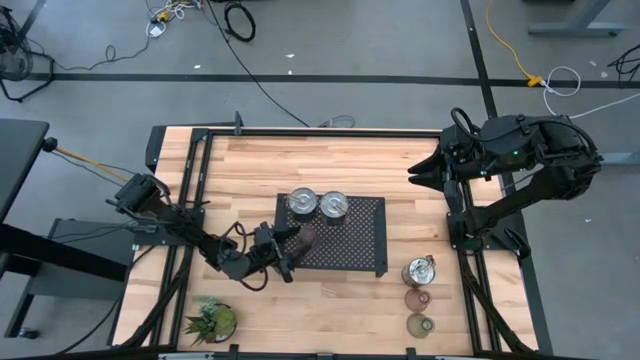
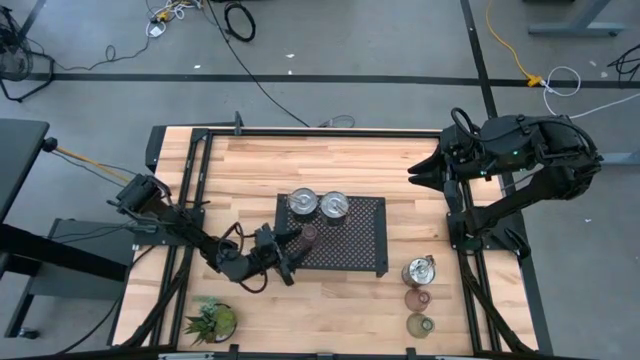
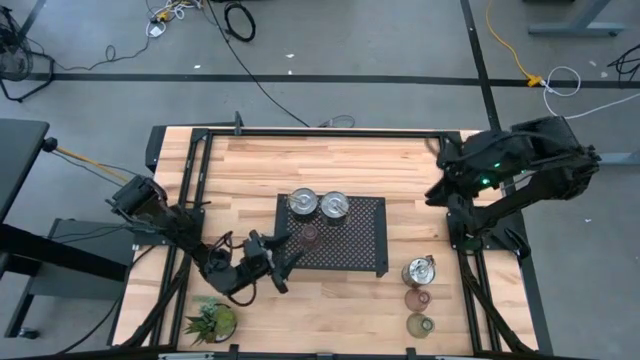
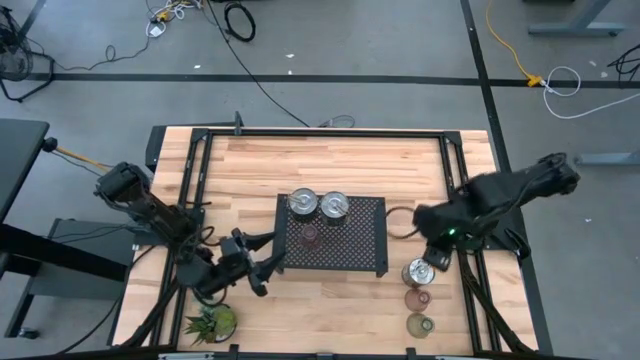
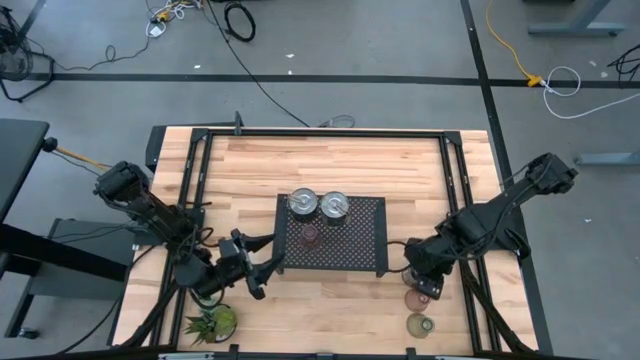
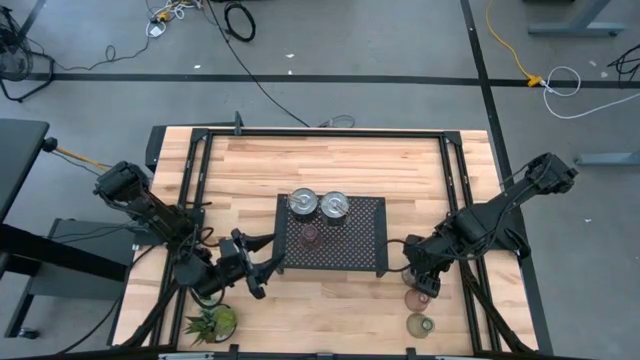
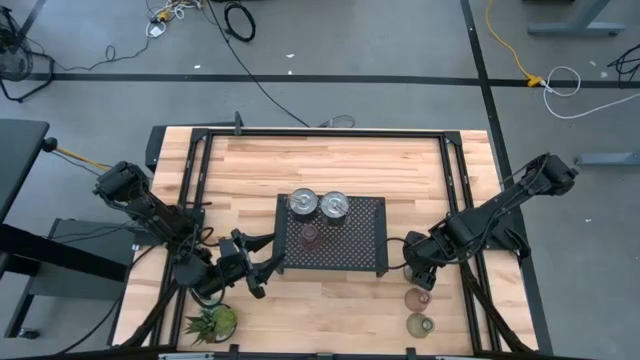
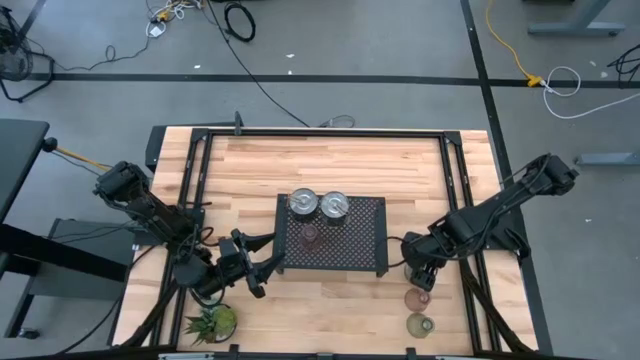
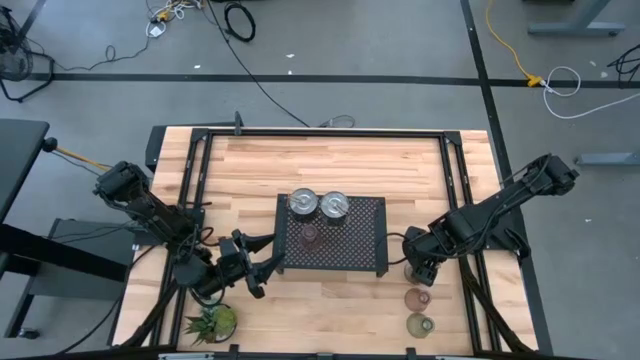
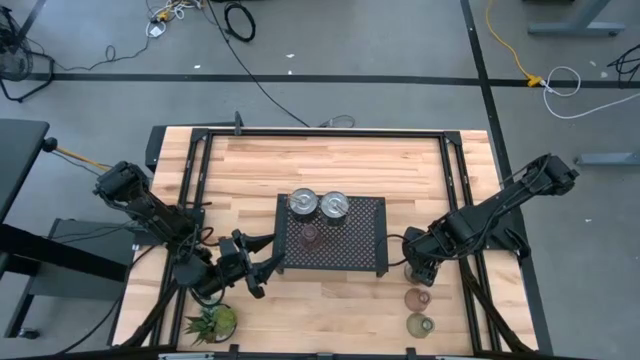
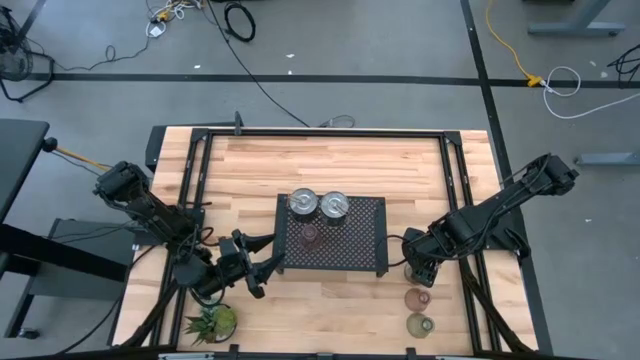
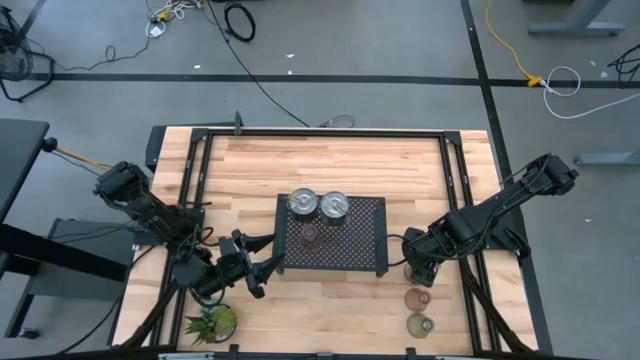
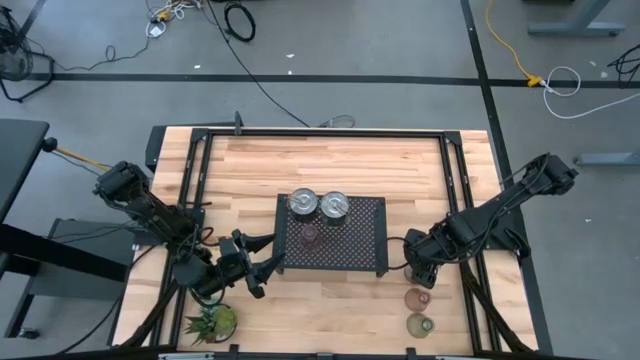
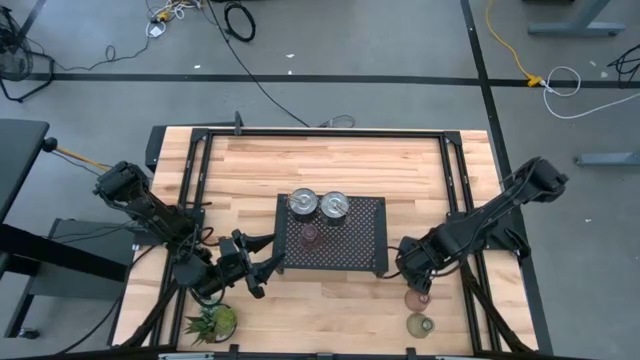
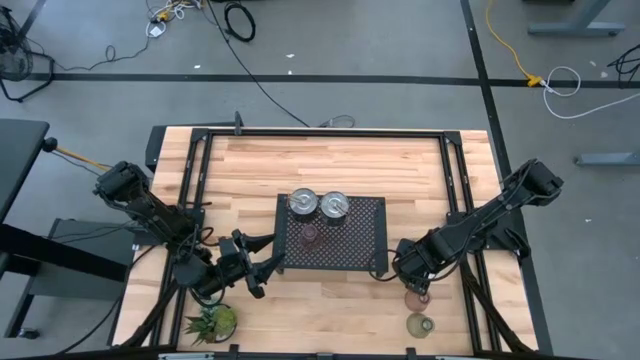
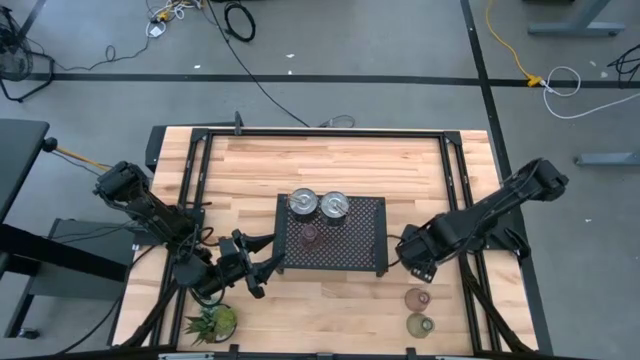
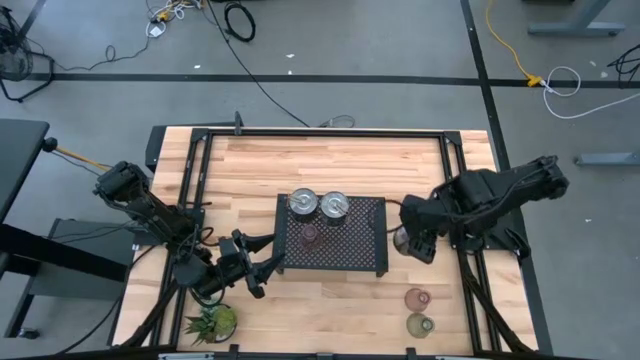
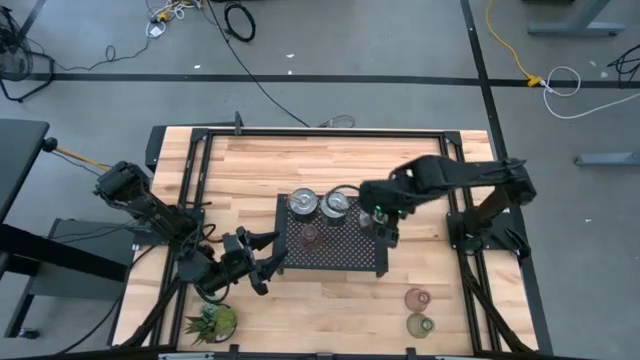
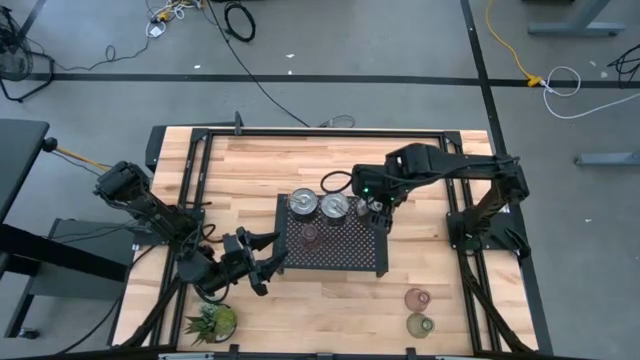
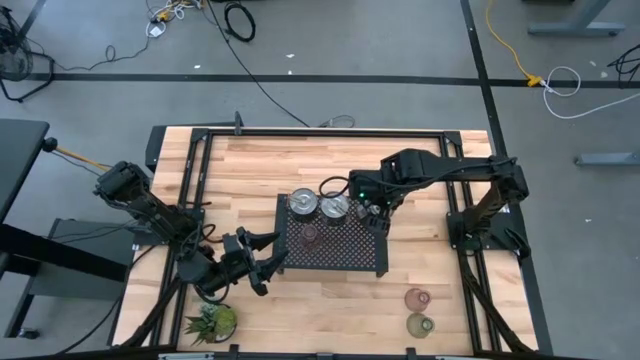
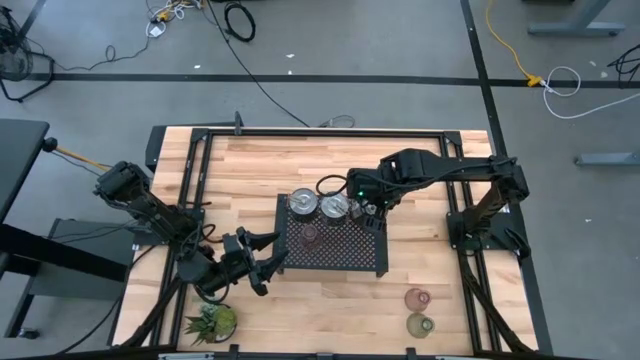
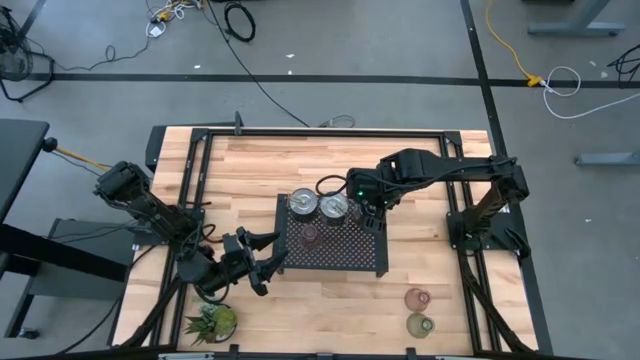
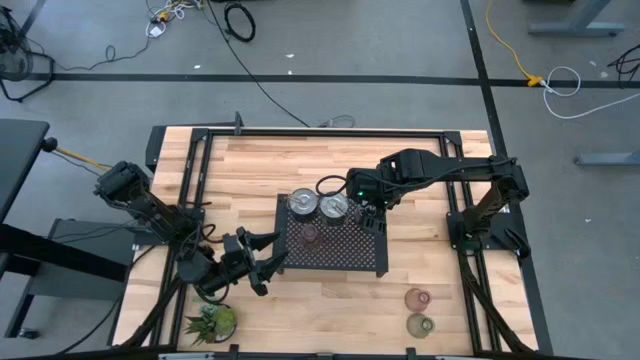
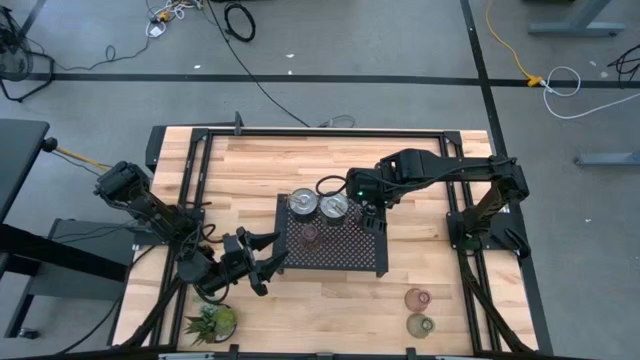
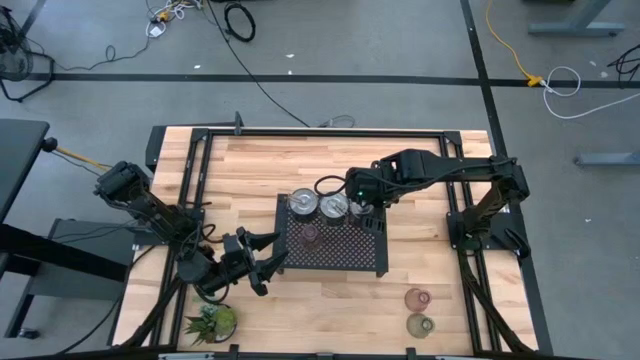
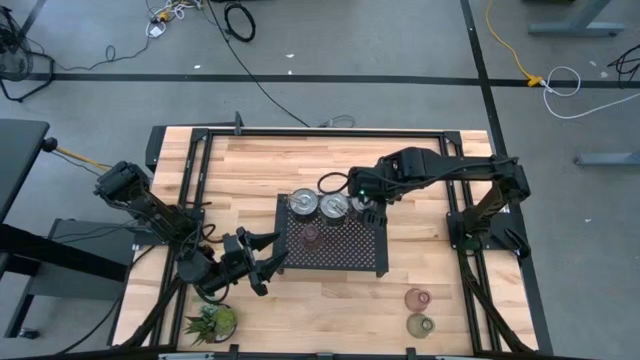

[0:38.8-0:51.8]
Task: Pick & Place candle stick holders
Put the brown scented candle on the shelf aligned with the other scented candles

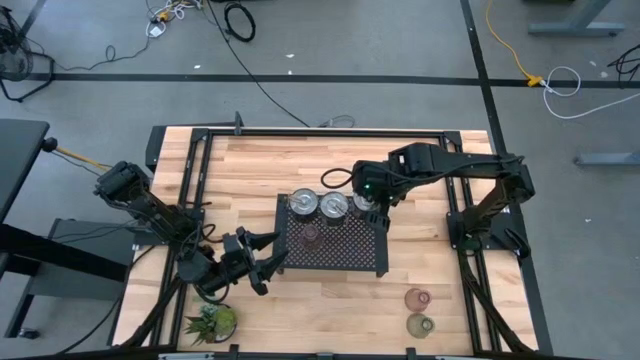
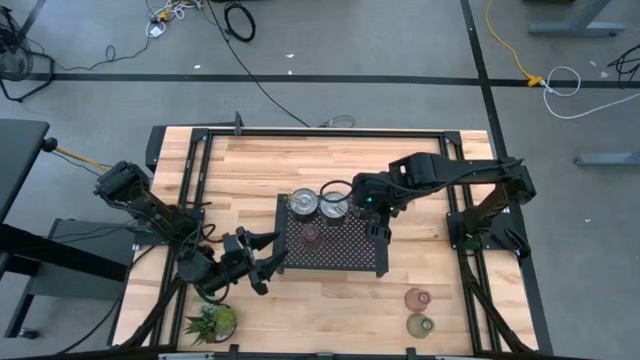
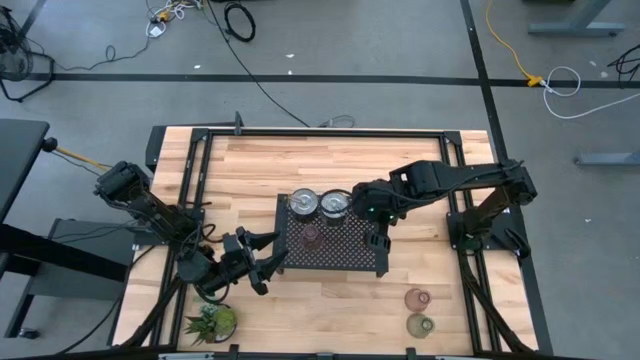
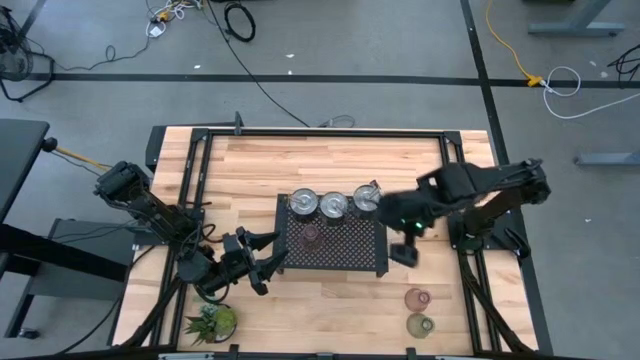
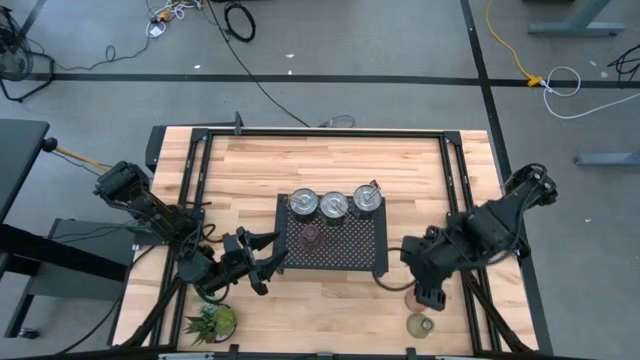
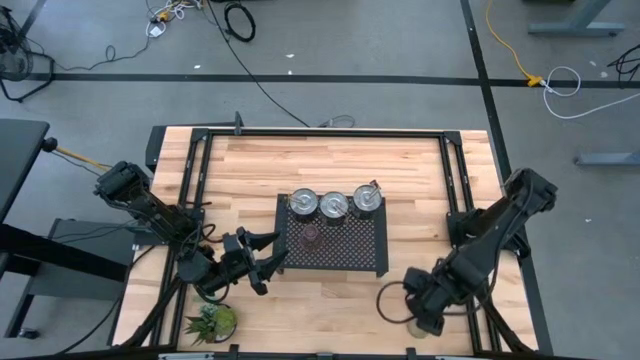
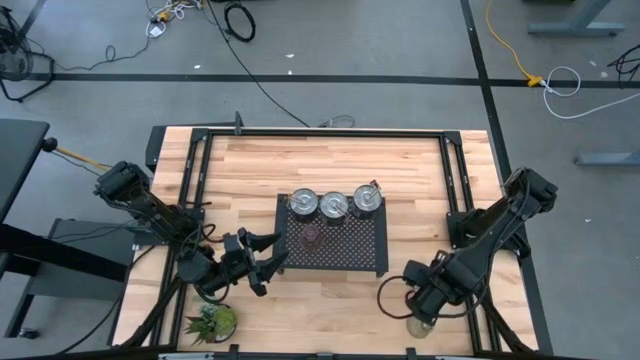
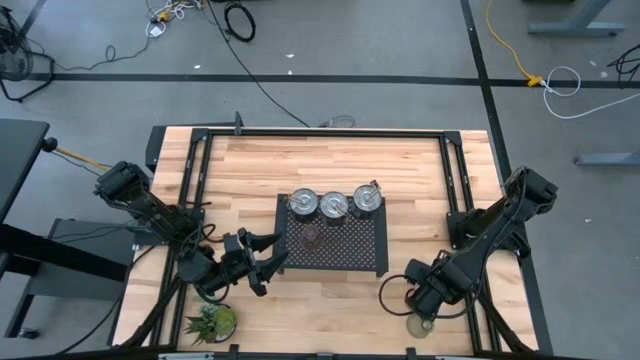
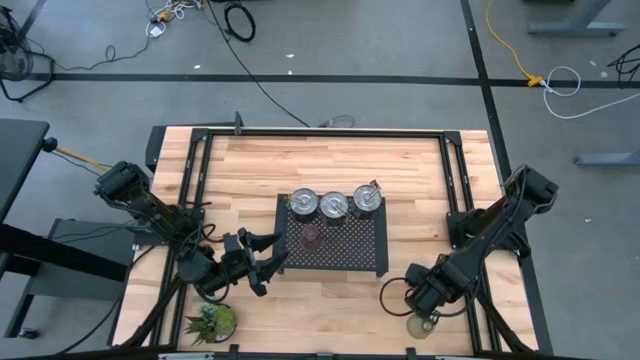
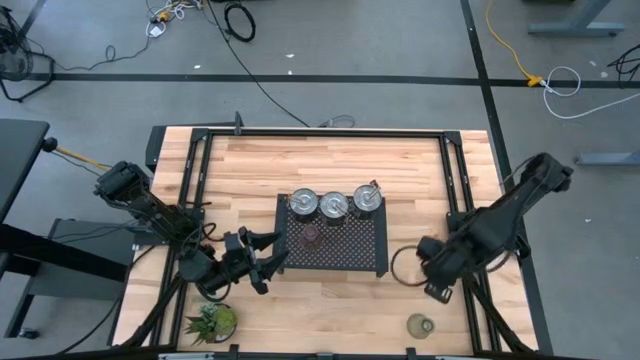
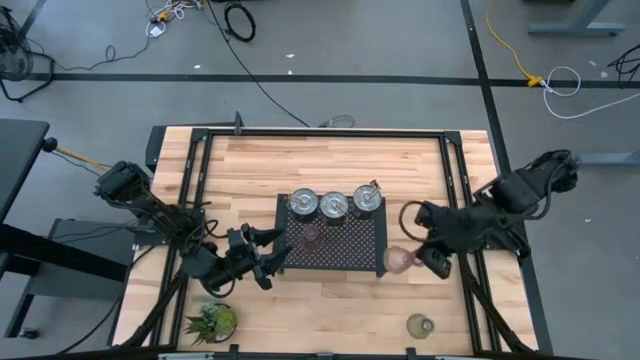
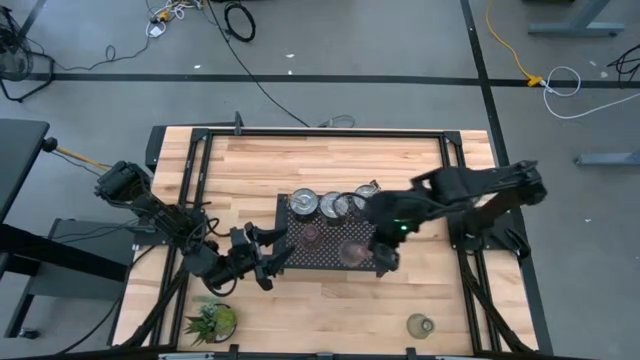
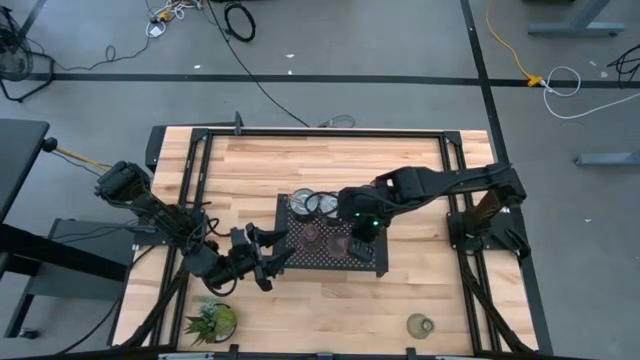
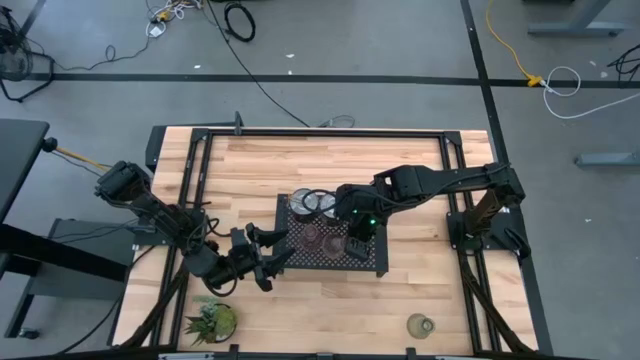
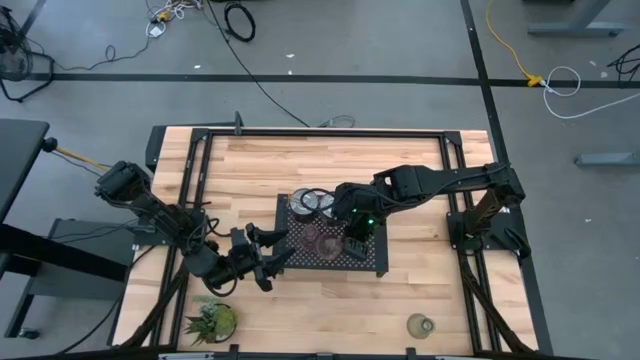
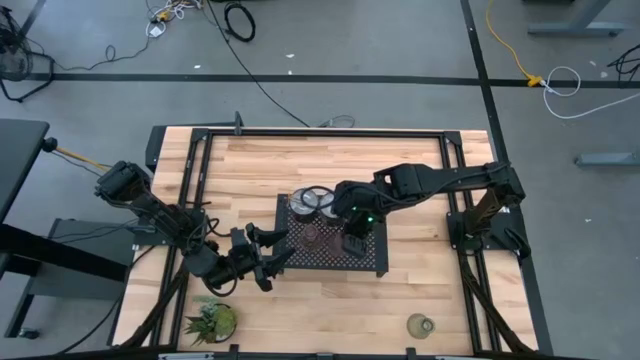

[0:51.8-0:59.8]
Put the pink glass candle holder on the shelf aligned with the other glass candle holder
